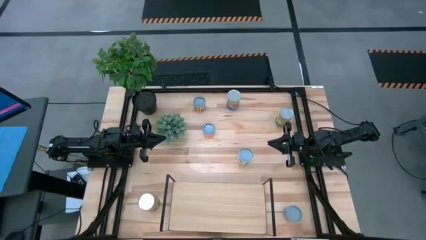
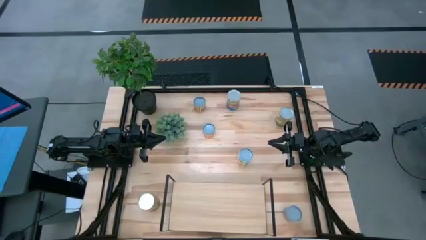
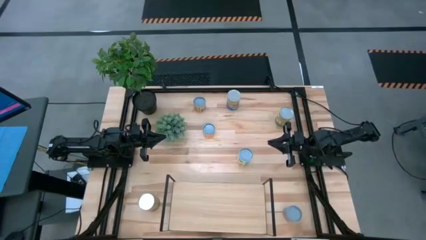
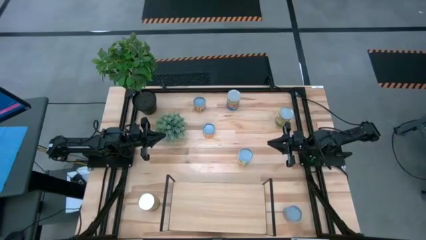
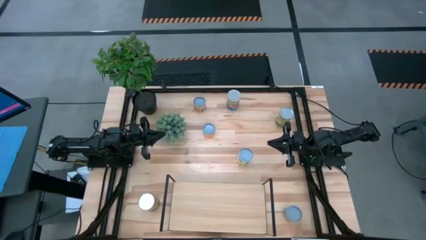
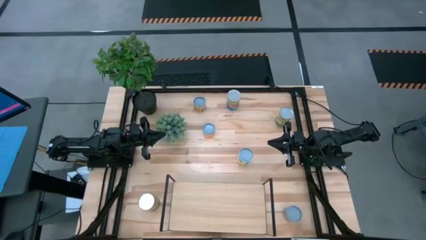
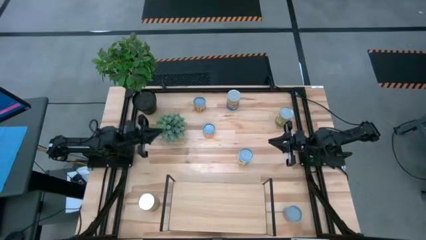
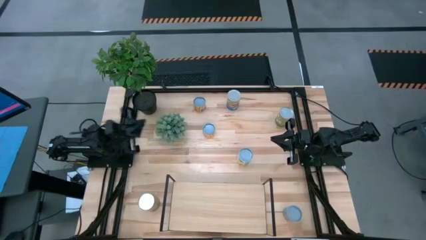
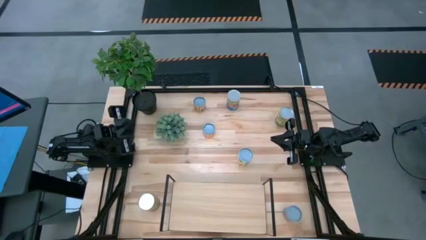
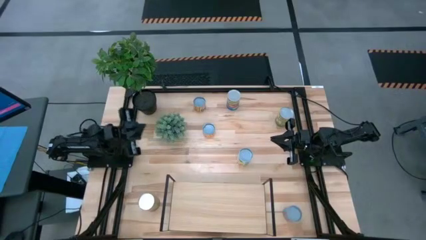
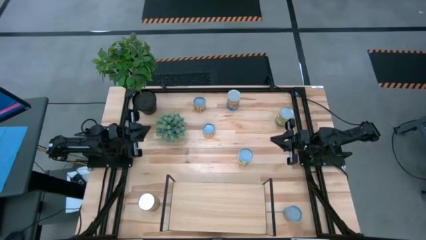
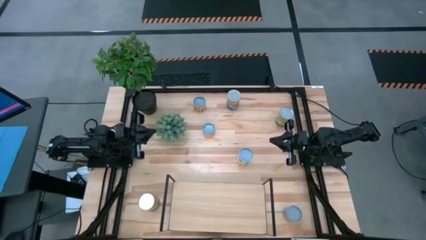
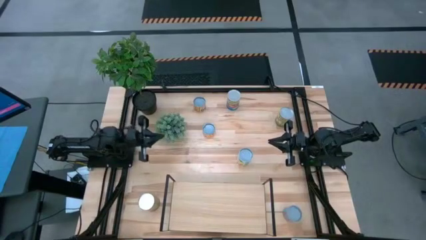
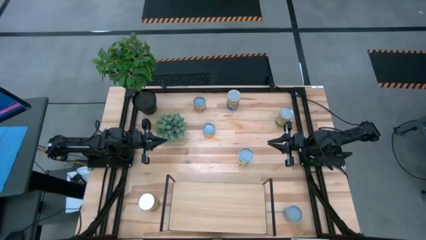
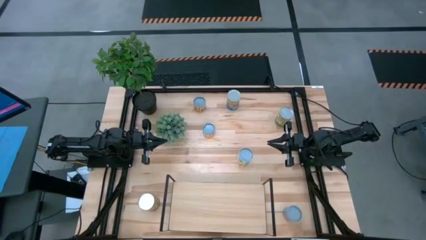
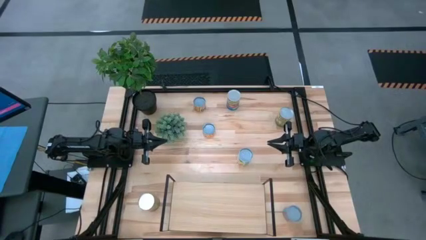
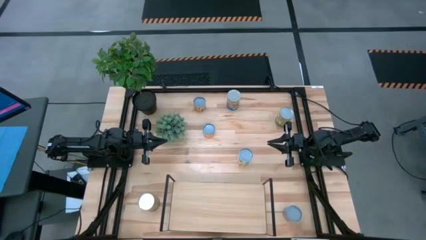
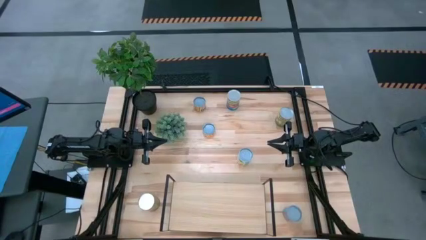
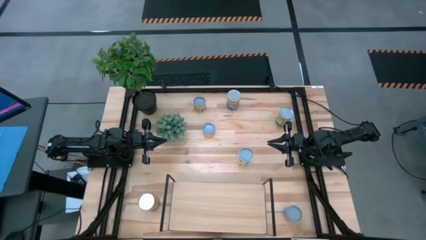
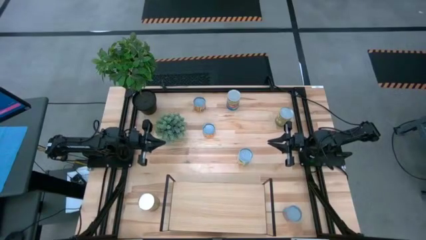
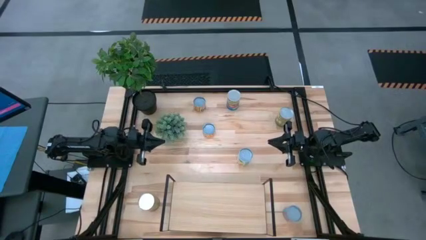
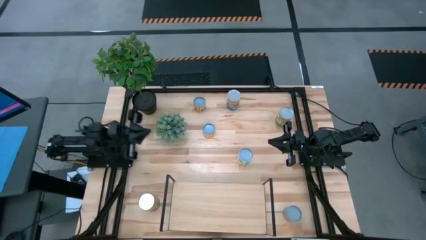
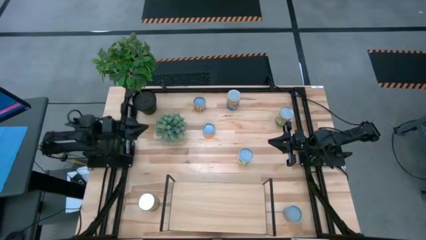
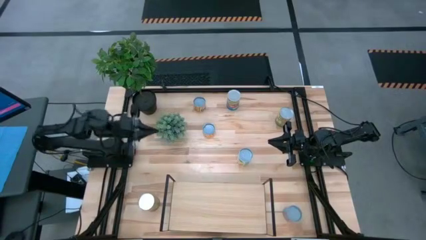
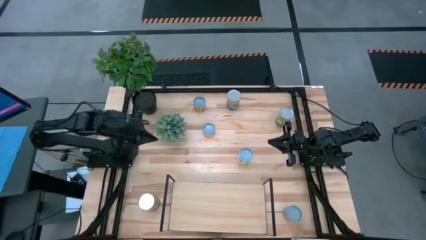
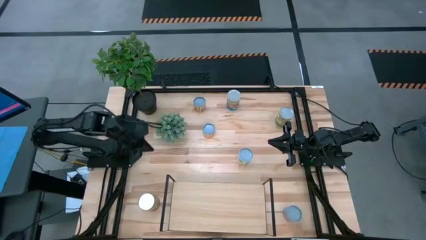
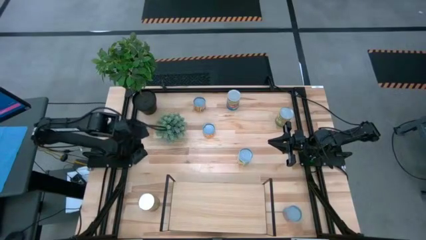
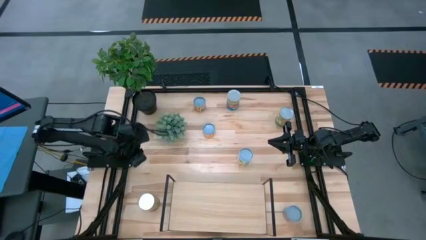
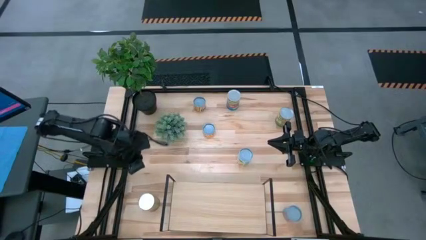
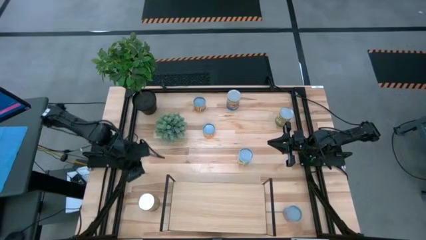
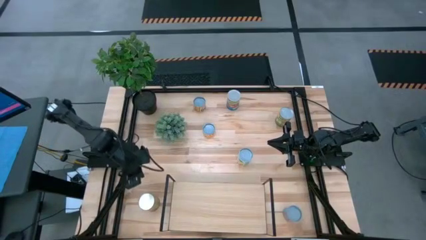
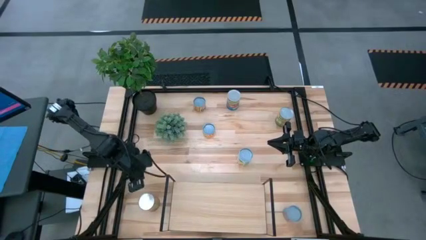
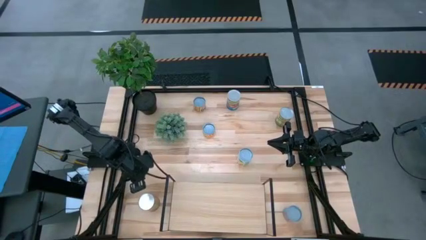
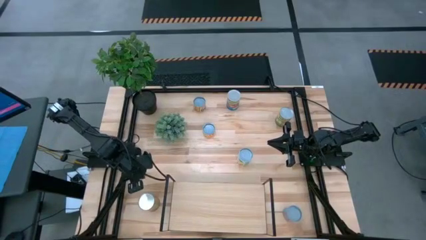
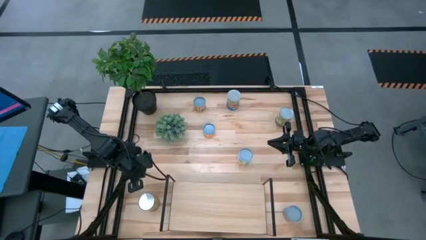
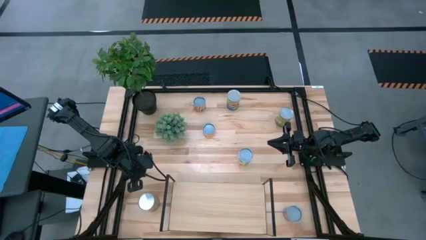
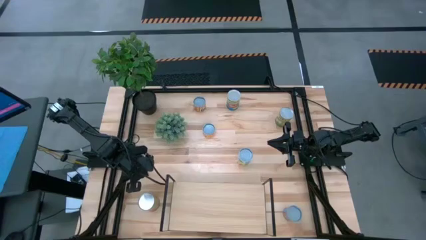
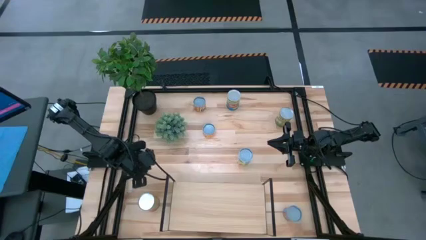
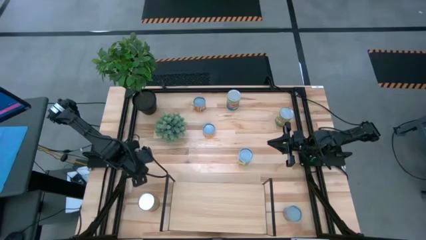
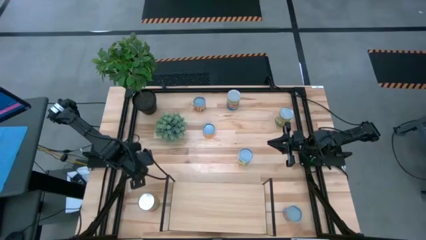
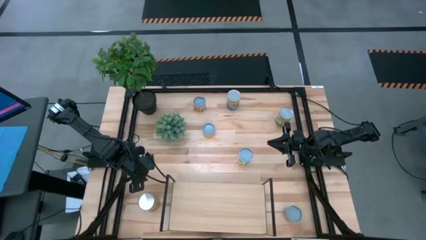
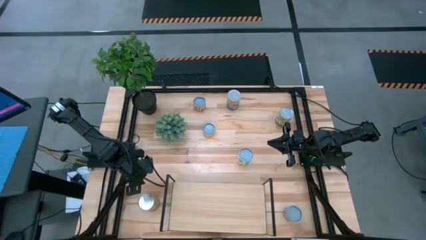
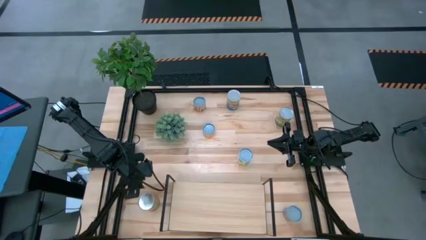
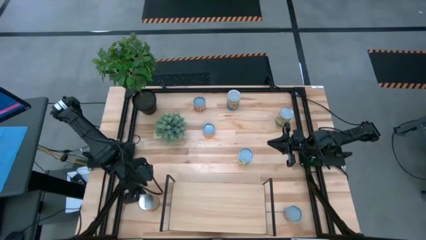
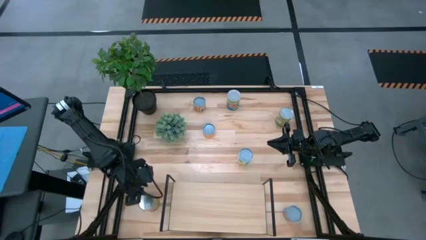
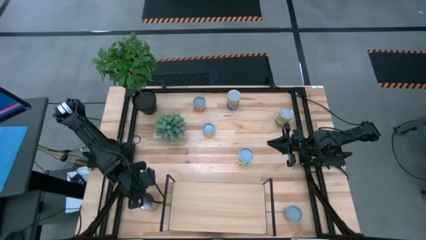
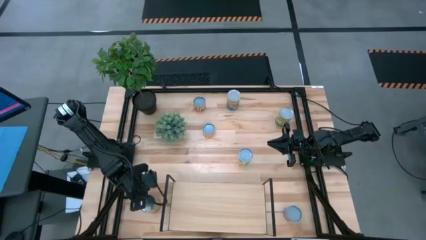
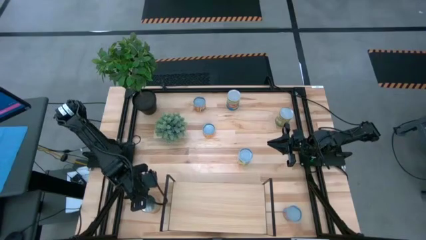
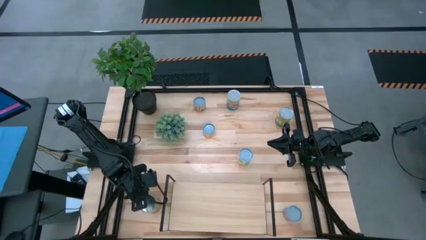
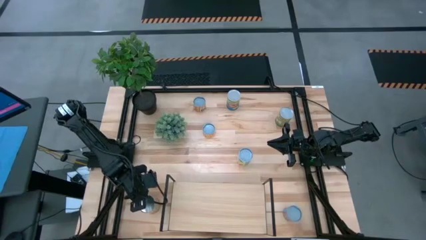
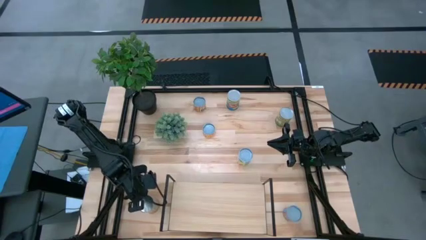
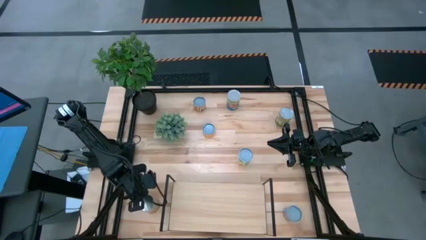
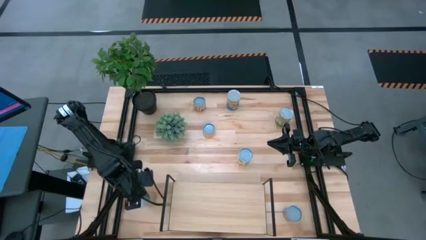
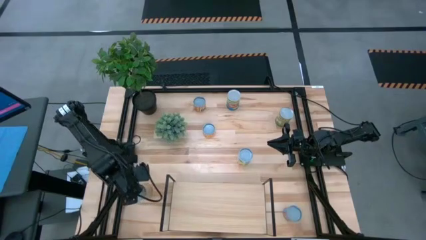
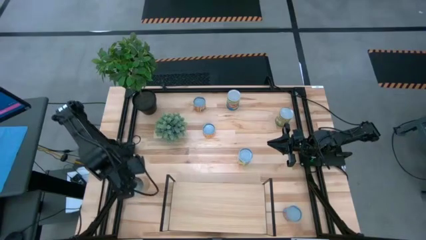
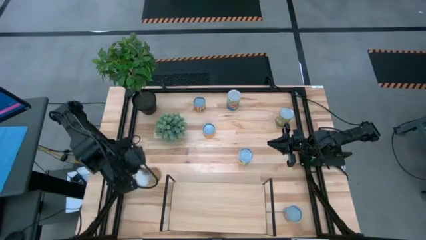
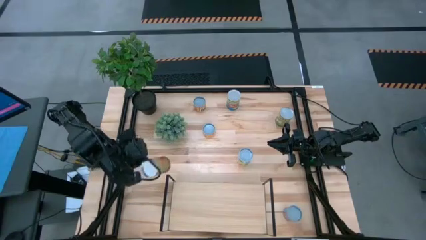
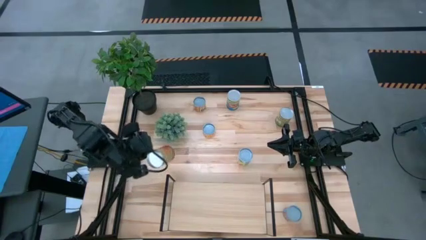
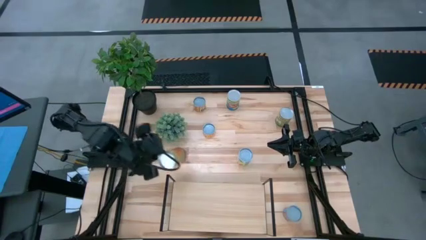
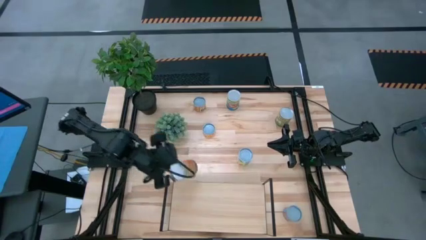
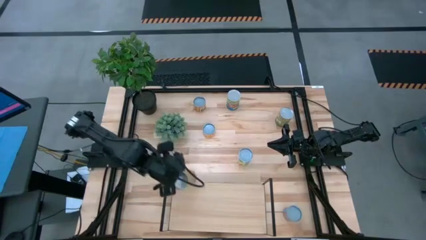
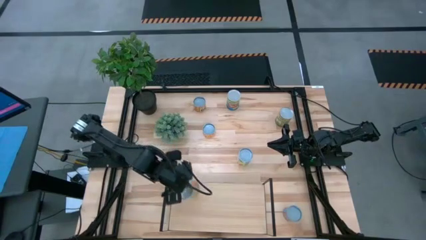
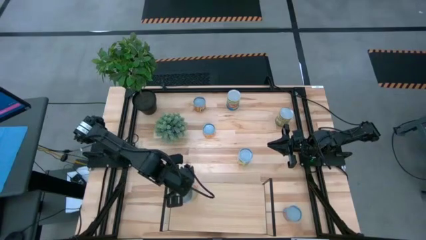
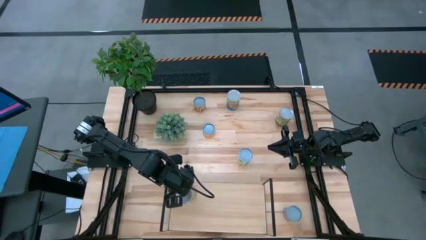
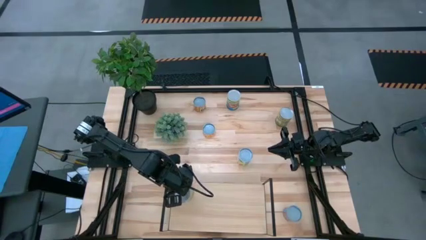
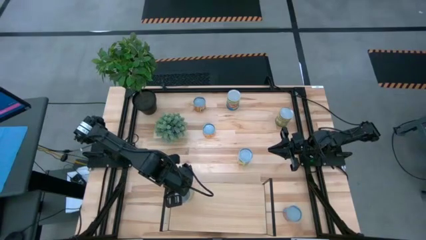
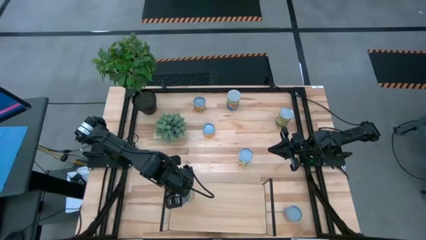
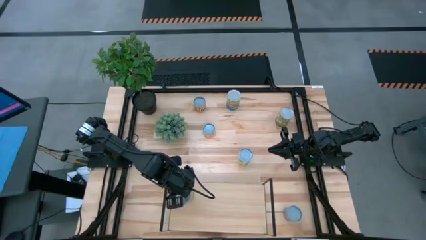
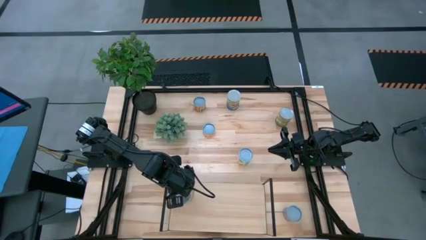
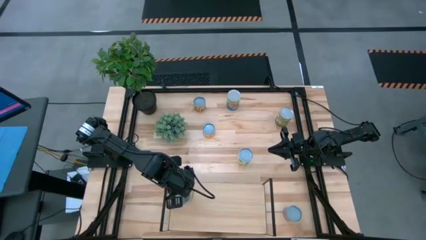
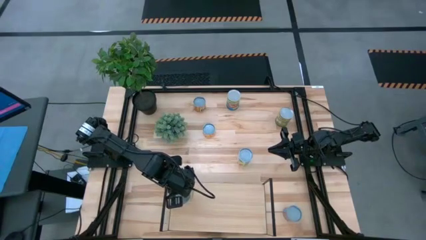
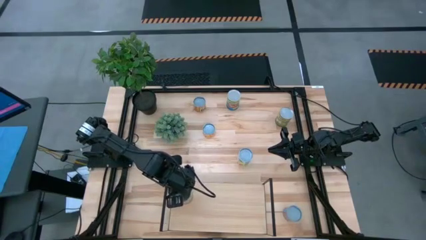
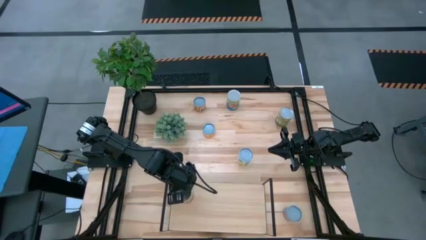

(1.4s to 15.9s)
Task: Pick and place cans onto a shelf
Put the canned green beans on the shelf
